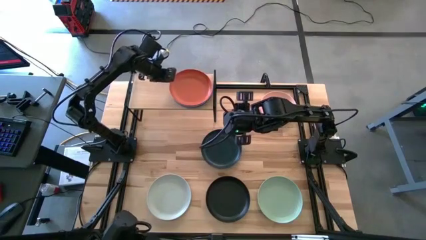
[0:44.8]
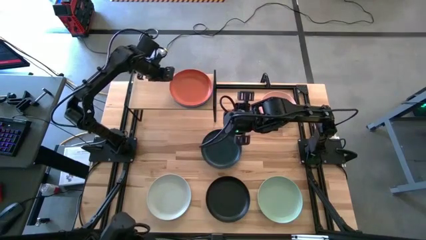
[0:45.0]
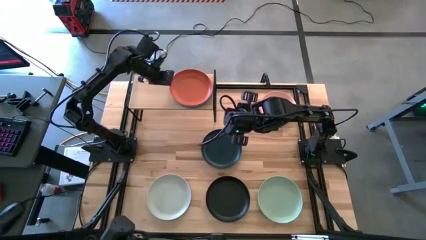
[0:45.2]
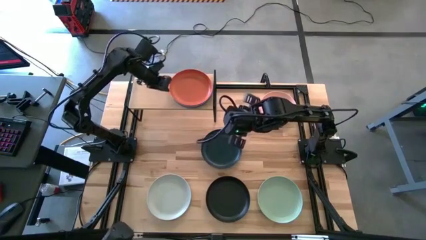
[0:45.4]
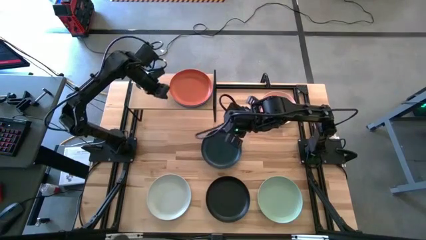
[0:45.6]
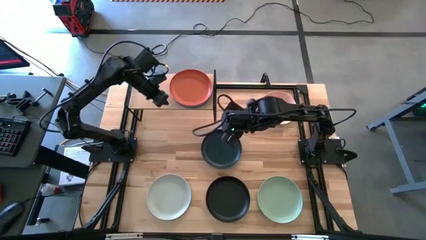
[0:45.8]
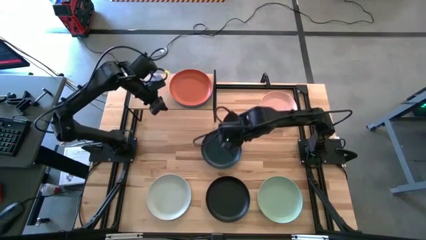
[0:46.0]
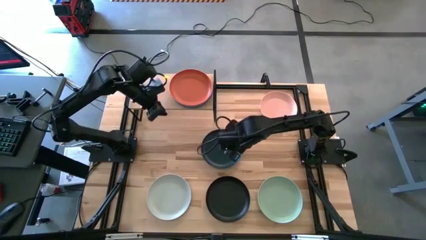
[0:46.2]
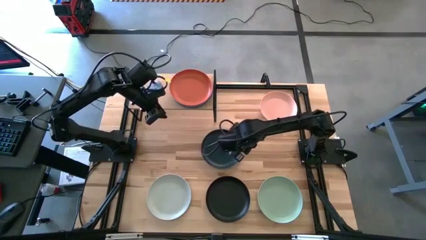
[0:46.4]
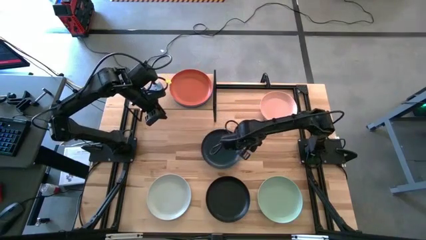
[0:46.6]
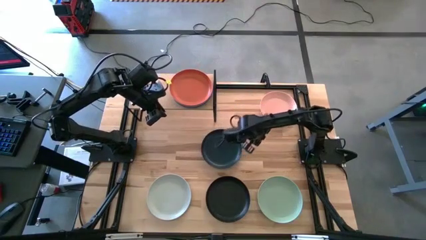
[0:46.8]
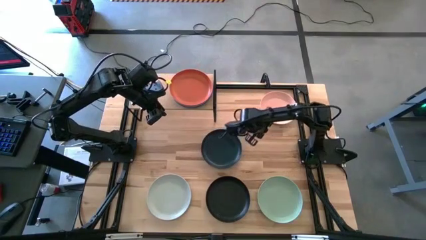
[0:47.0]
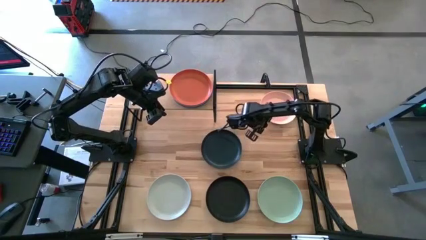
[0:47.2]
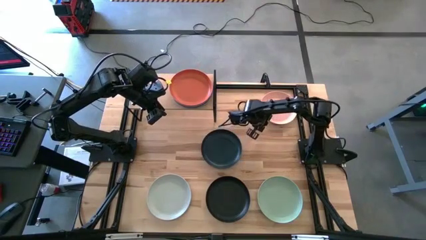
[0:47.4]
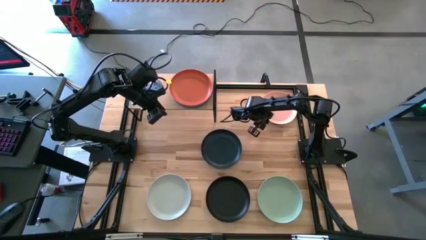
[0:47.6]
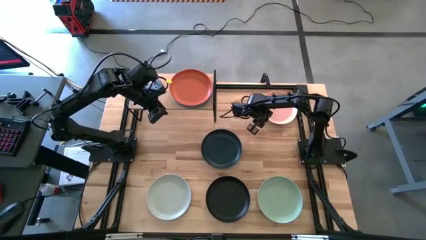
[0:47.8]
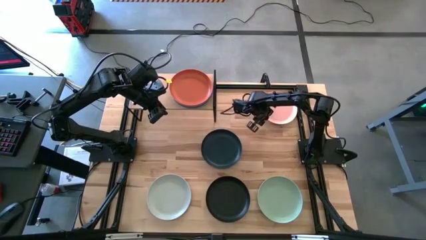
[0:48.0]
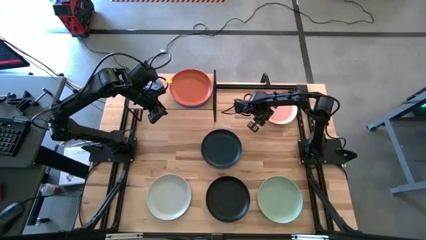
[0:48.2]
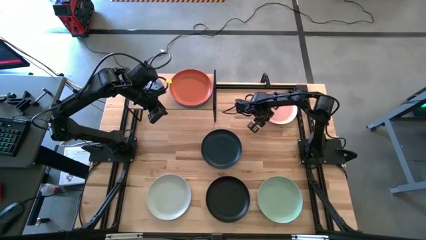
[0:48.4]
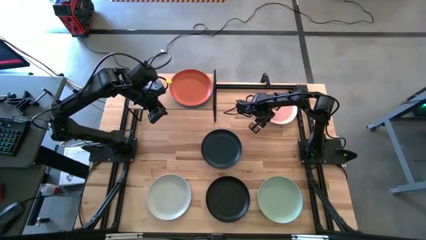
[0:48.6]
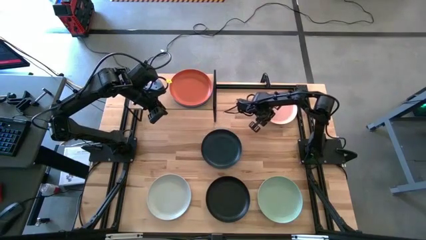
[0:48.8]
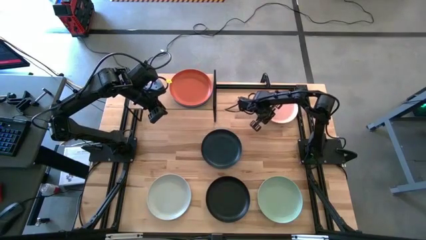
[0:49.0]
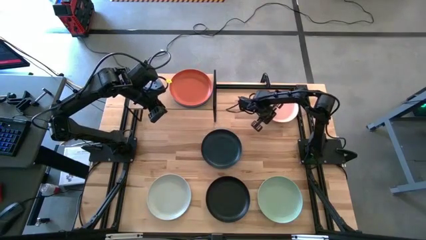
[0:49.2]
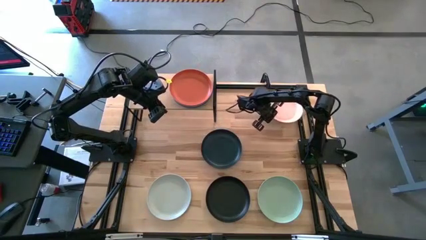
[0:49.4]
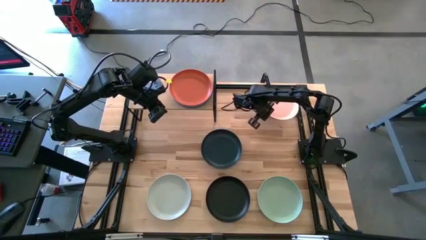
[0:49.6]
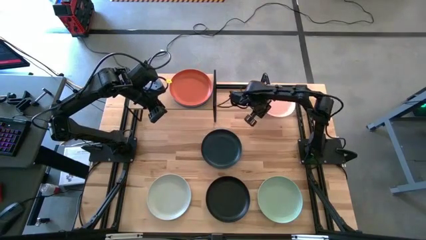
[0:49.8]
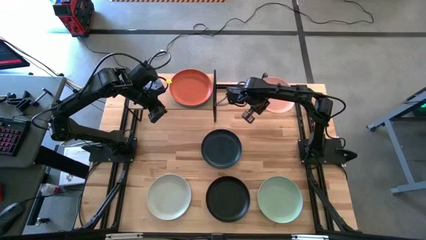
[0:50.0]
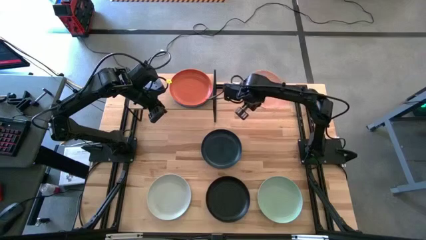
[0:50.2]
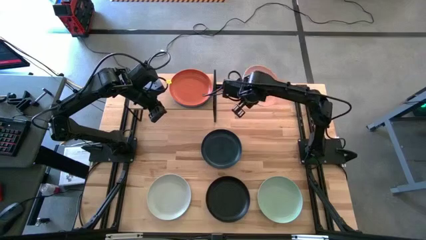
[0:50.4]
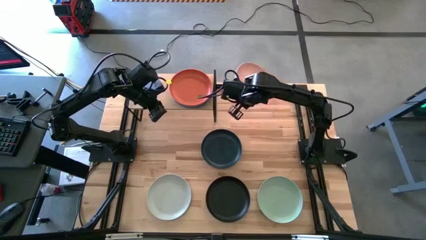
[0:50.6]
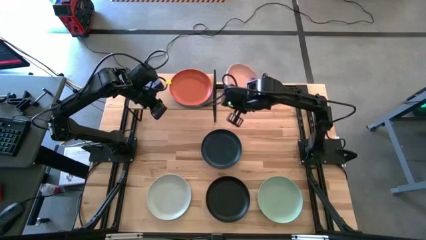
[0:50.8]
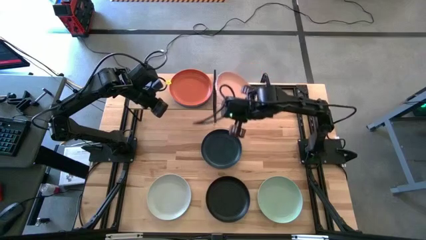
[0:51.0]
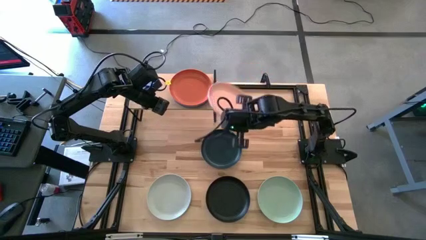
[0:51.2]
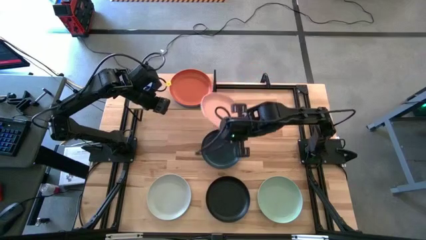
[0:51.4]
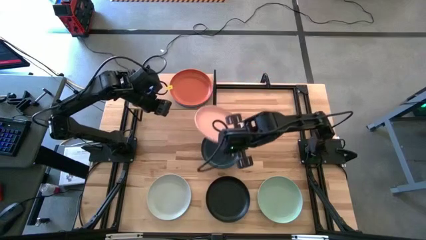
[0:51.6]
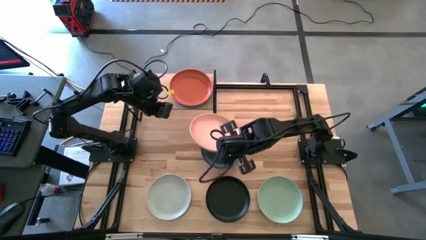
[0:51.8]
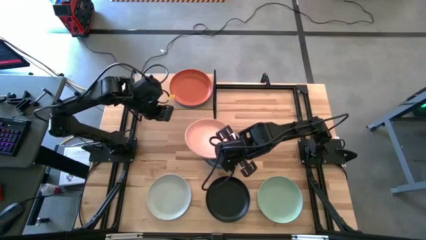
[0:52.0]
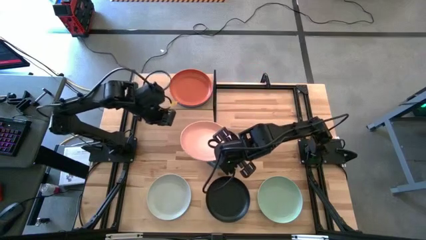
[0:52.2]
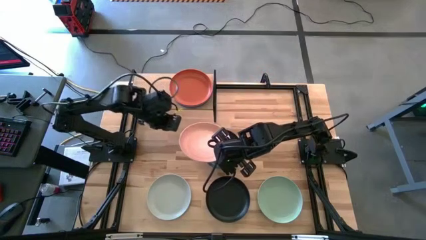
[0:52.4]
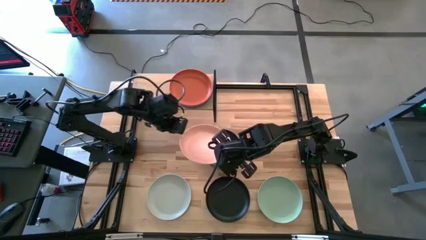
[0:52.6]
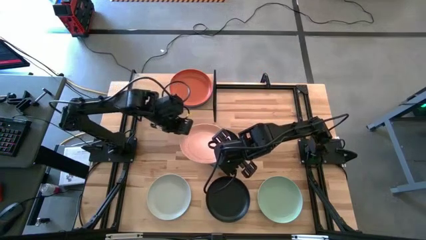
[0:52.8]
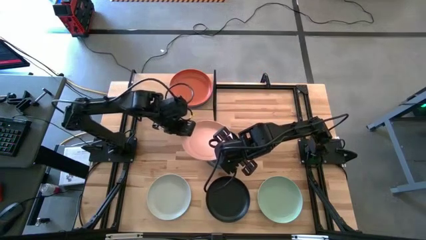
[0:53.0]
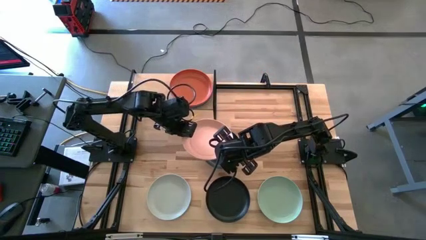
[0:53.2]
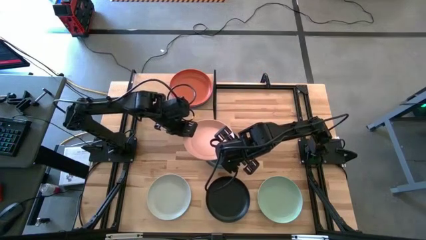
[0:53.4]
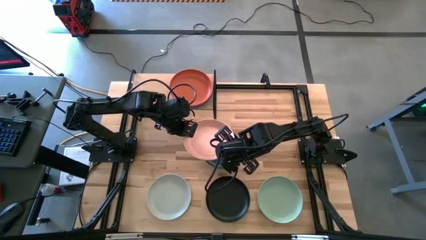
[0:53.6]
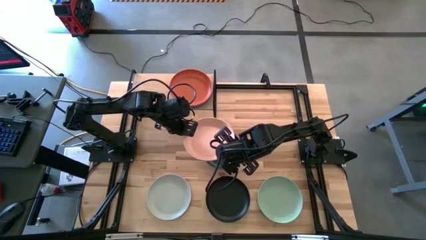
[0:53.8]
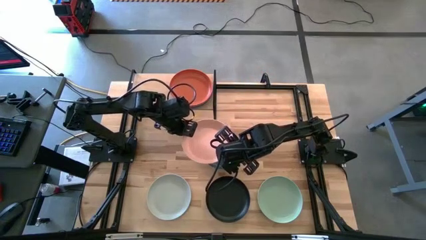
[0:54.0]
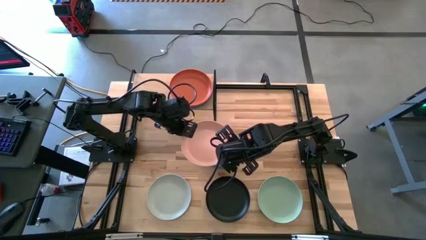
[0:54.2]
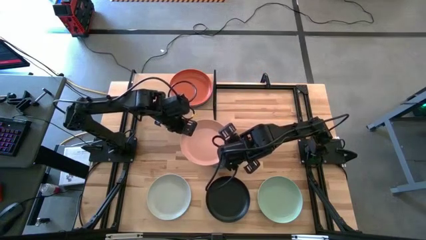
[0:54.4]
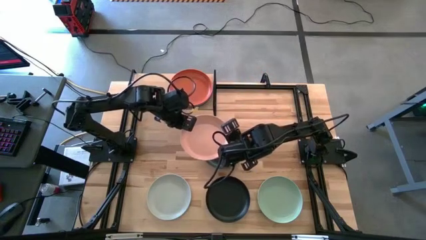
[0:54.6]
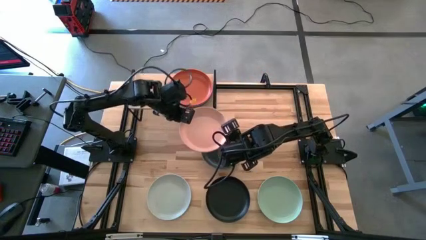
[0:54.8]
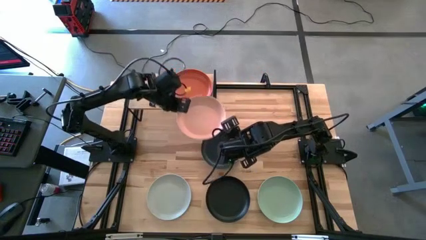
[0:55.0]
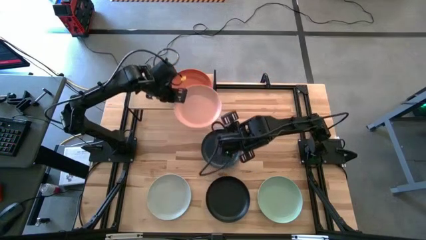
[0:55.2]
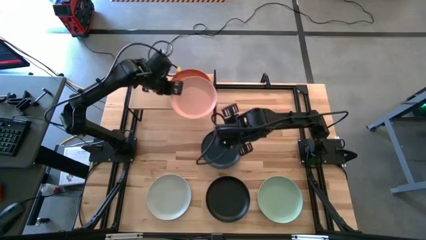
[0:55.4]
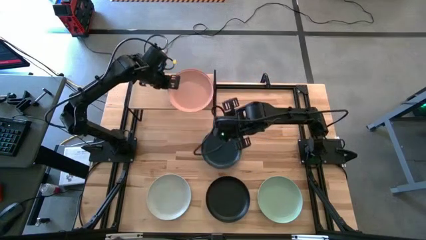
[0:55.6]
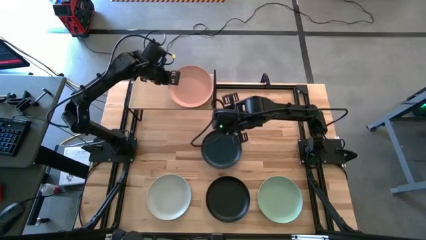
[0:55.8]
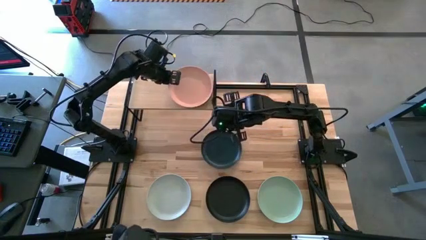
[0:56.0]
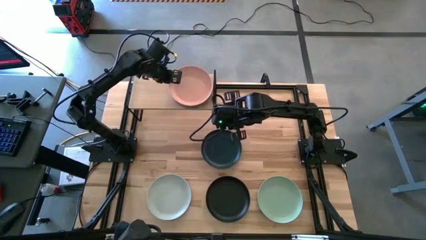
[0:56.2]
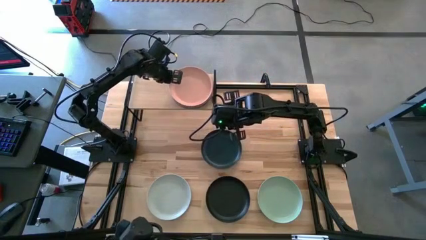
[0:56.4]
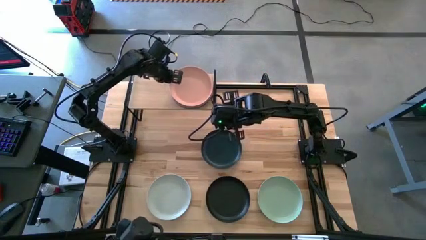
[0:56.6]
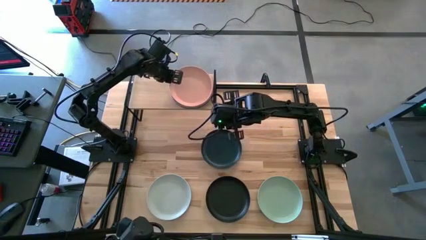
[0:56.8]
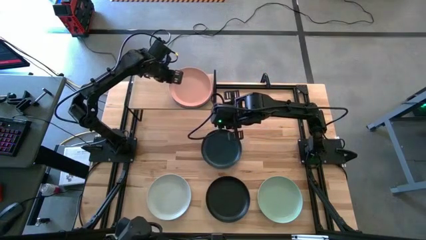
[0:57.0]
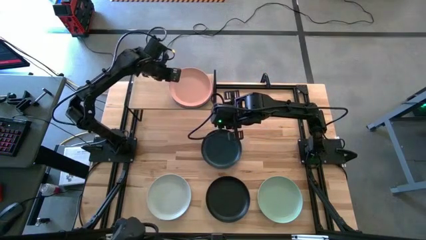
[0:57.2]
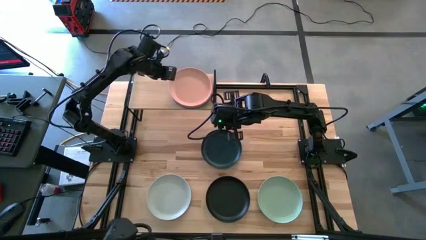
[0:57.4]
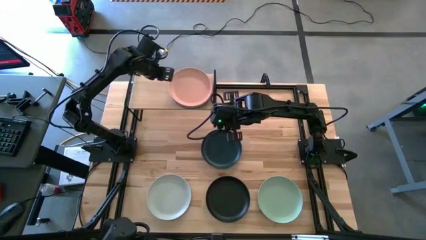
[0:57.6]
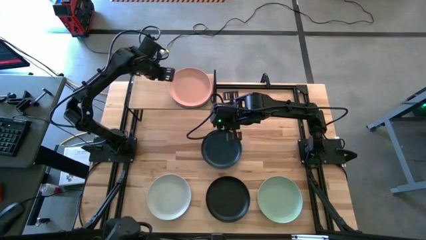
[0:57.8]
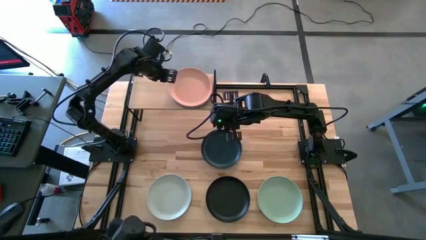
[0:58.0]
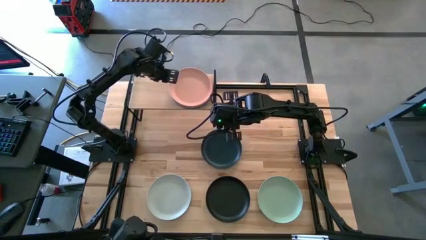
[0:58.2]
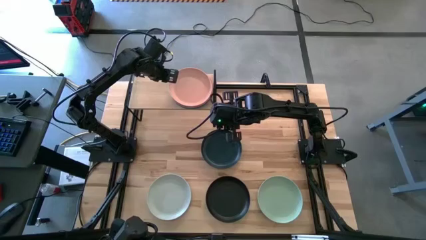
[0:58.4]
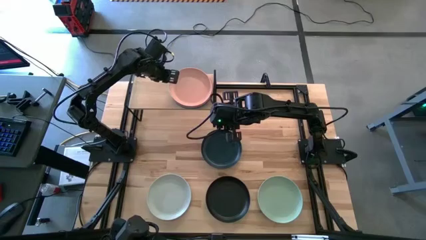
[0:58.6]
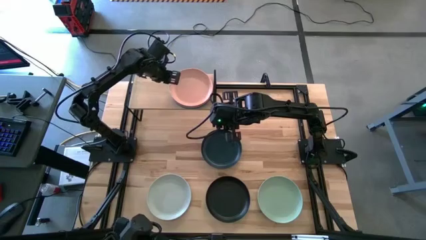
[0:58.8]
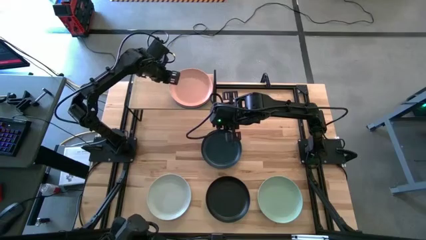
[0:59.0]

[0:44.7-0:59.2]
Task: Place and stack plates onto a shelf
Stack the peach plate on top of the orange plate on the shelf

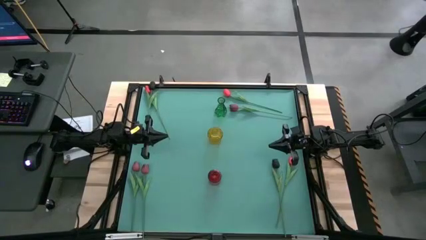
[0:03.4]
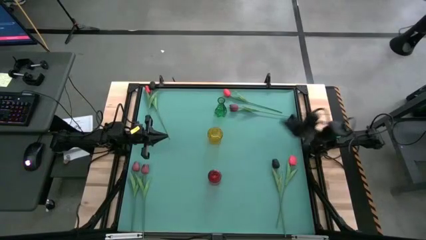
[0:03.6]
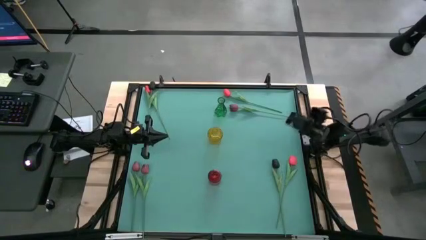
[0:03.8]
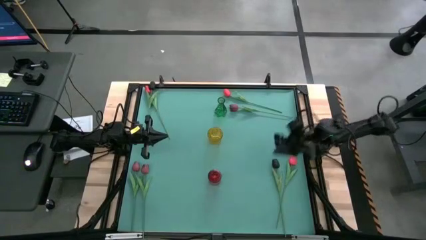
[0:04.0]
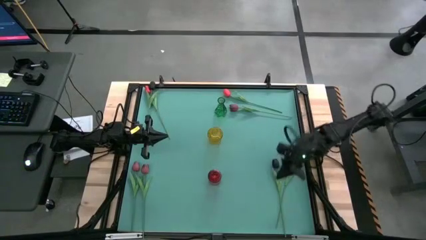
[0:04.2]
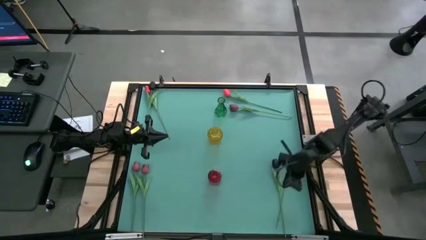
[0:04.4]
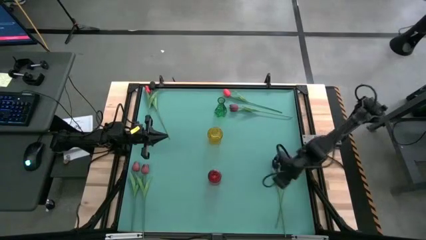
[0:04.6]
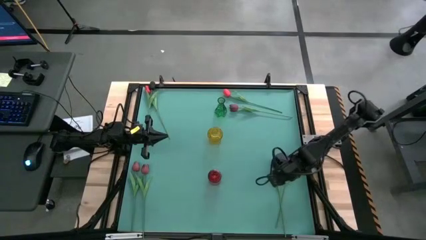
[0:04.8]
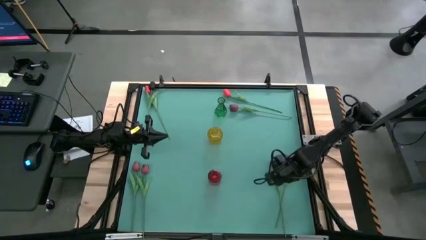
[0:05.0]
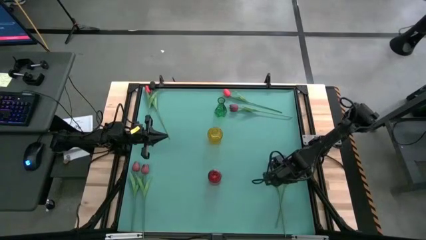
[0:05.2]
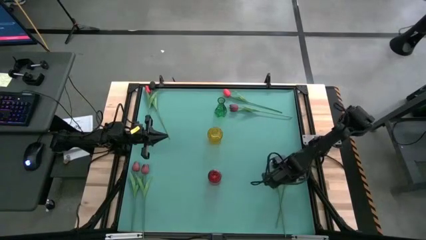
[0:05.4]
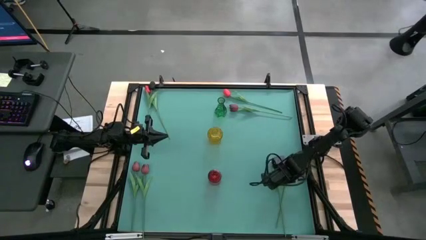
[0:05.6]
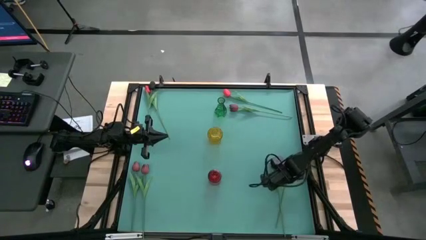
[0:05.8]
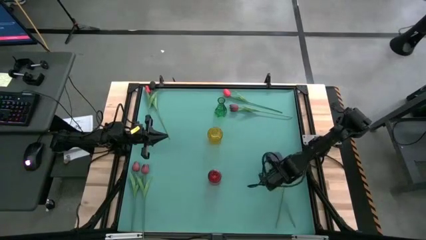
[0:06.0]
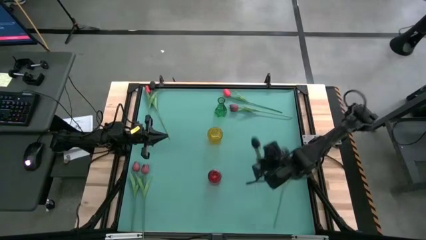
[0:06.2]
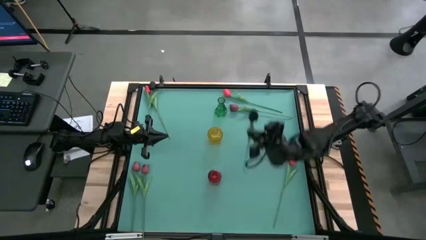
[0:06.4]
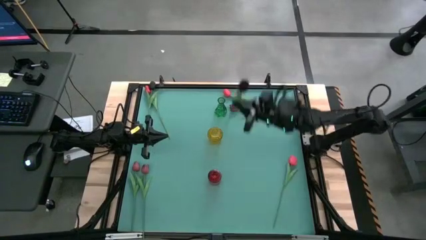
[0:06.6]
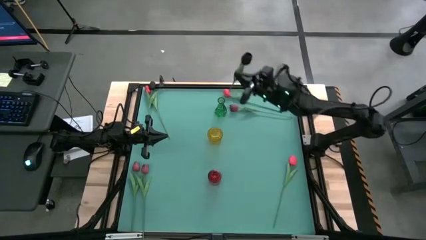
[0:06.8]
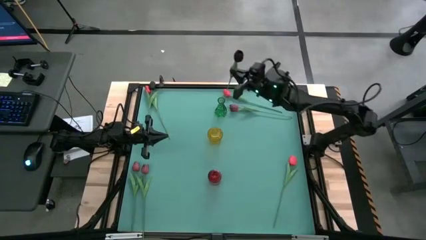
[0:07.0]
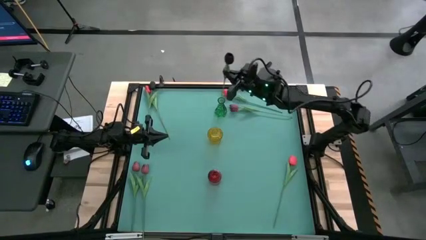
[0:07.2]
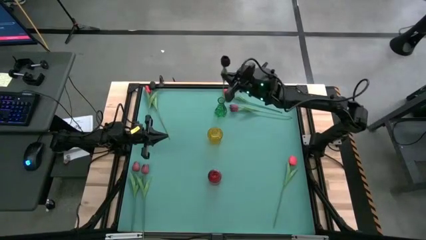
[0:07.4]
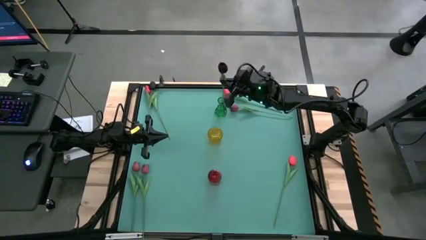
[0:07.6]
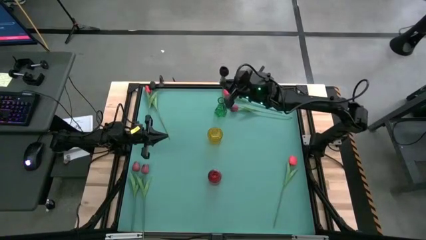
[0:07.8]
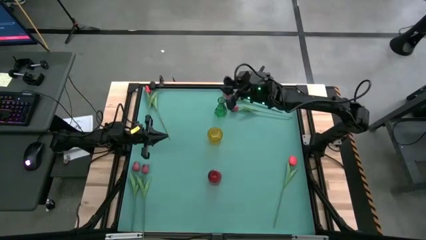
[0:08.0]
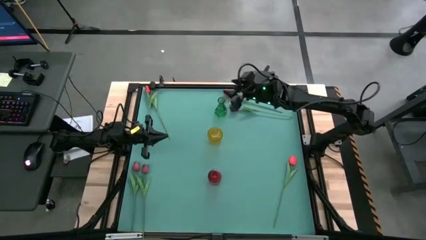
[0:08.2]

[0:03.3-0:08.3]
Task: Sort flowers into vase by color
Put the right black flower into the green flower vase
